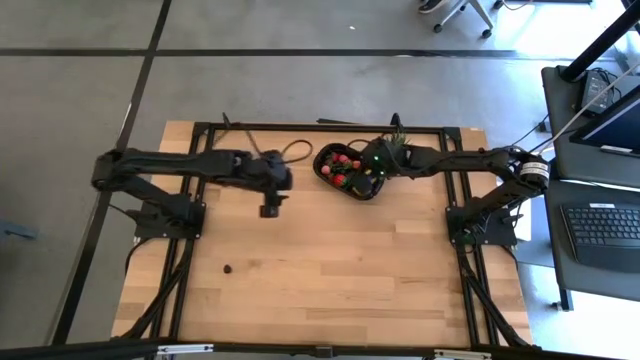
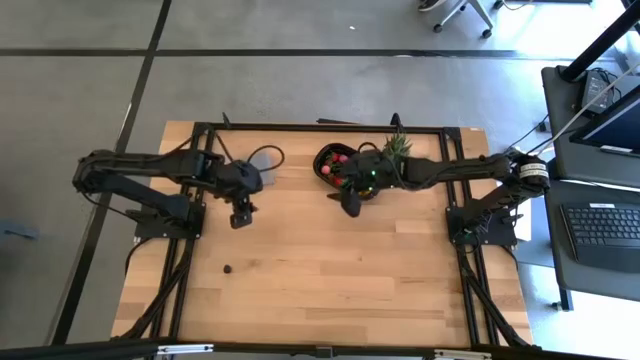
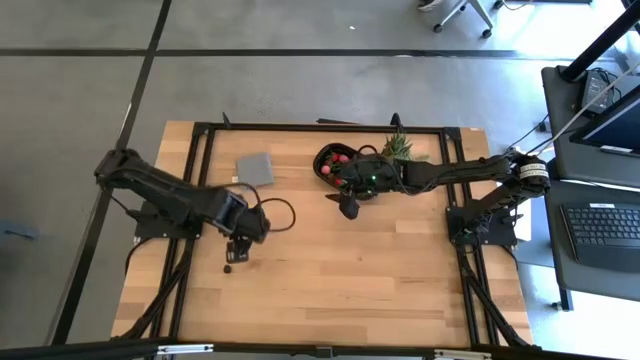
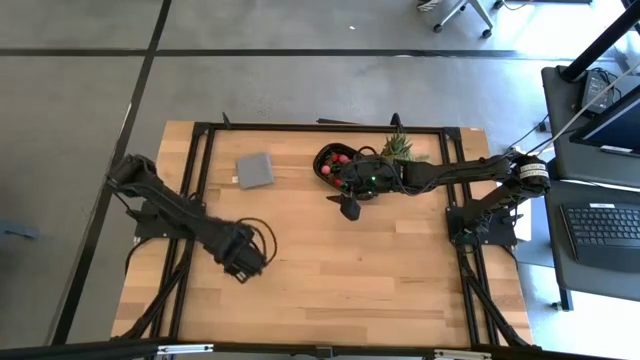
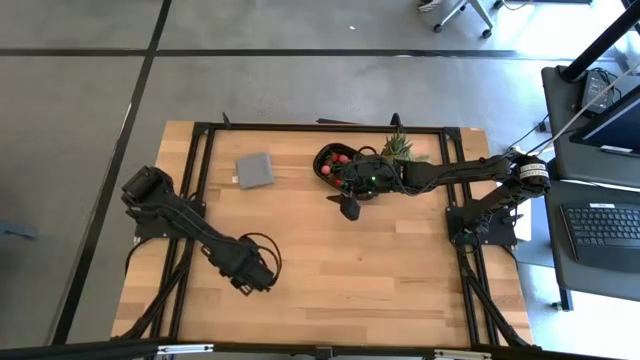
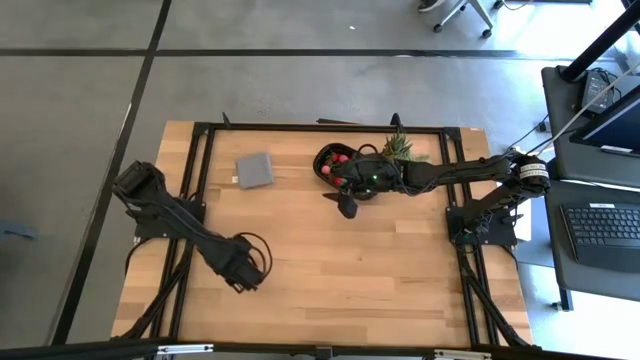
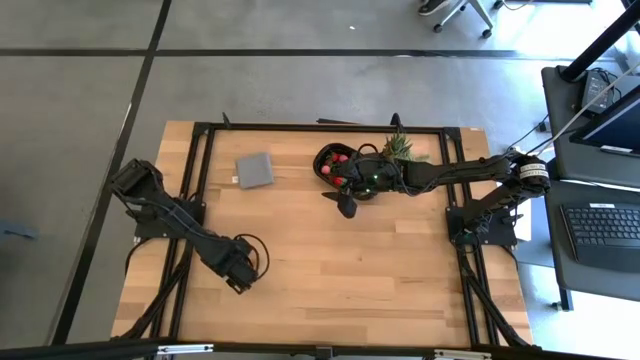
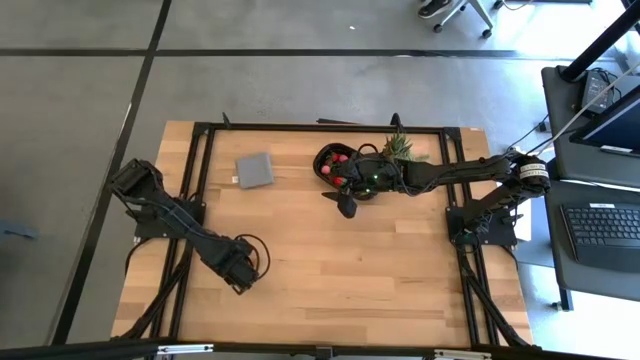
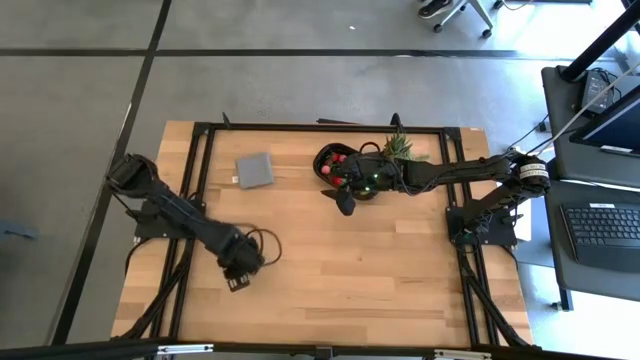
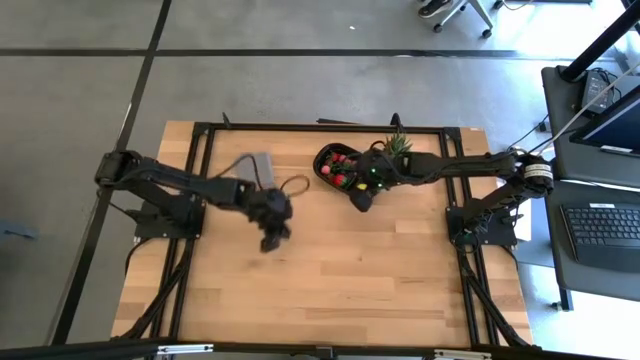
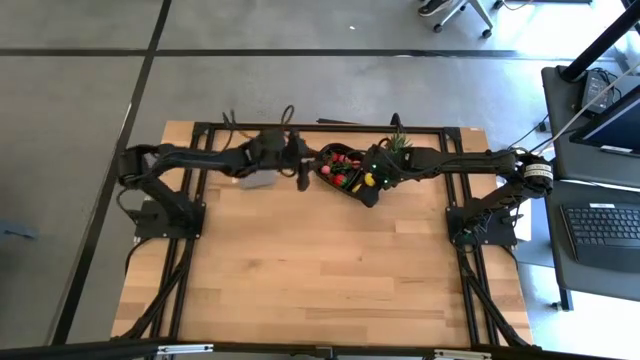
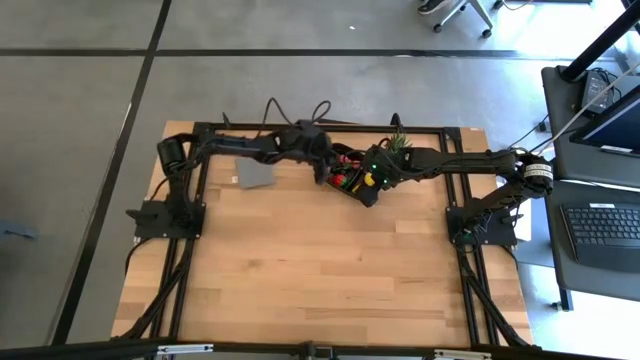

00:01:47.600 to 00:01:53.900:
Task: Pick and placing Produce into tupperware
Put the blackberry into the black bin

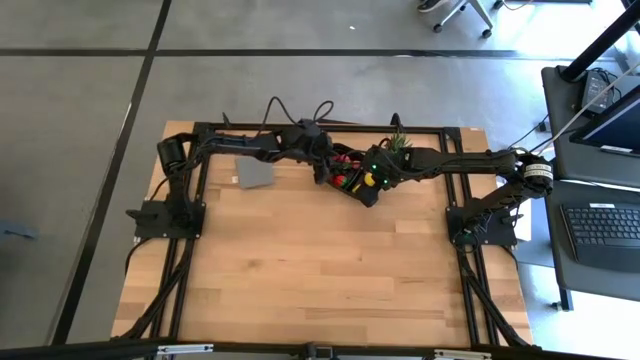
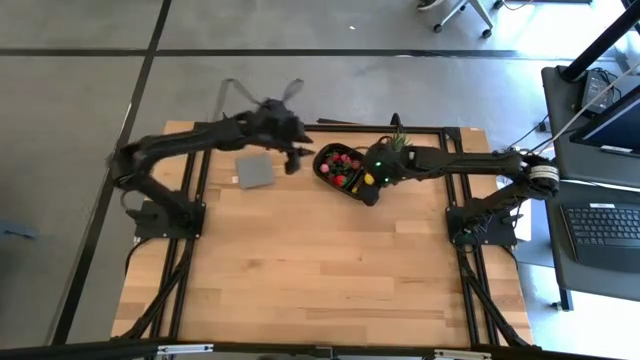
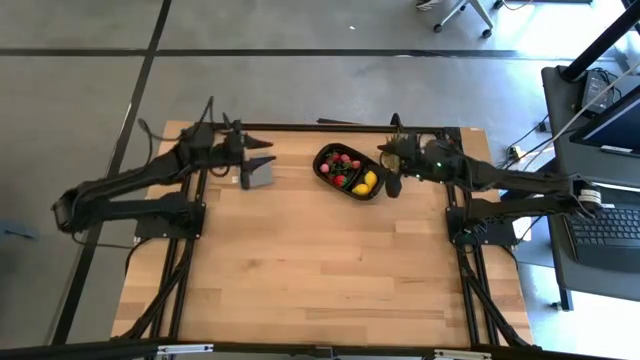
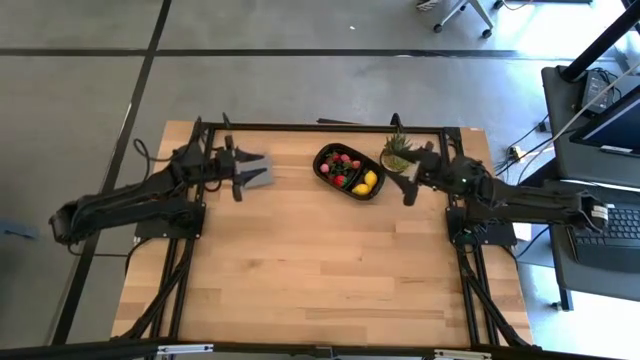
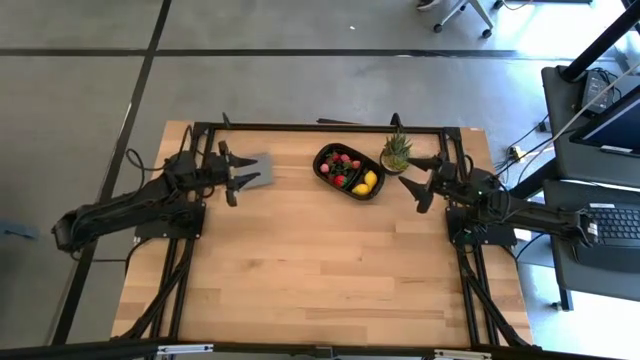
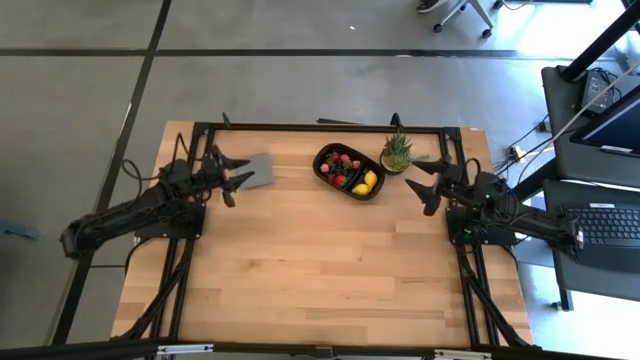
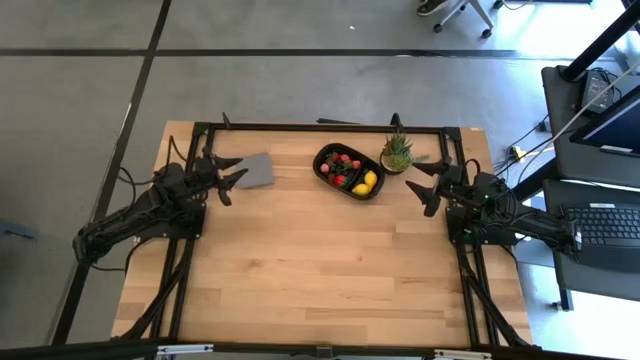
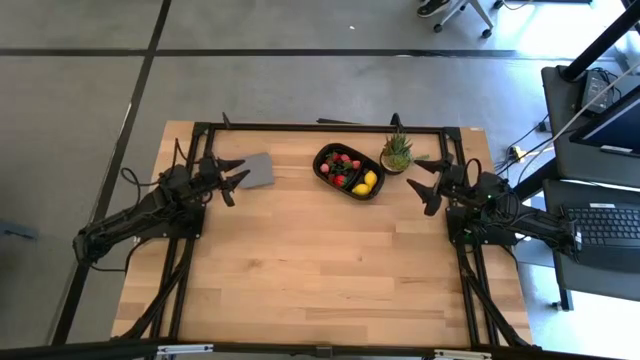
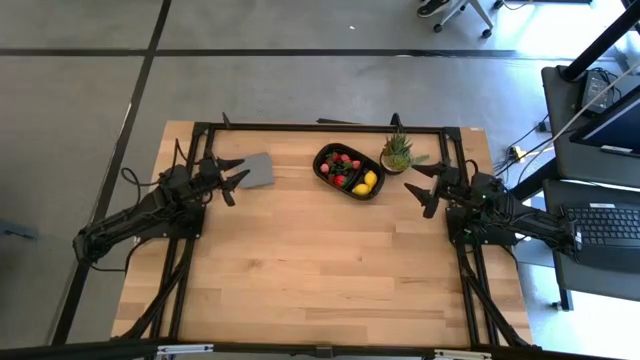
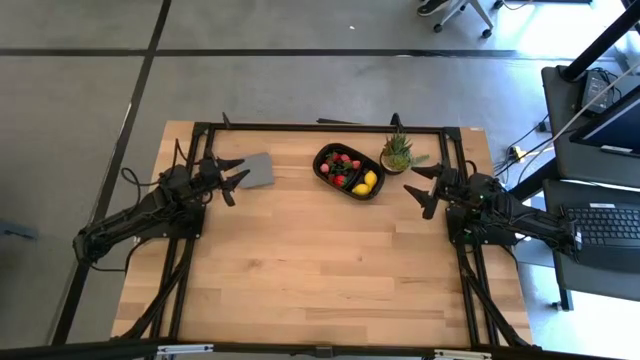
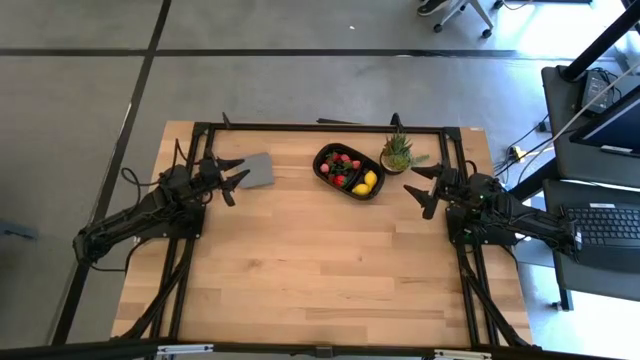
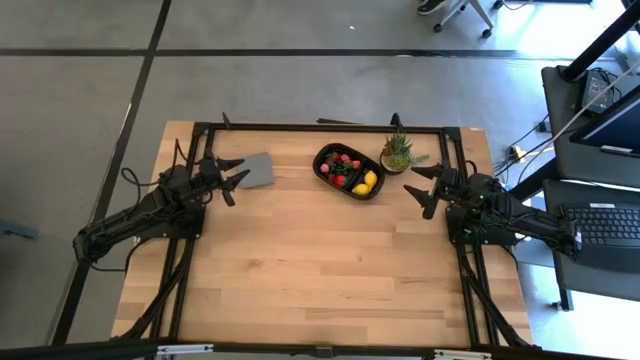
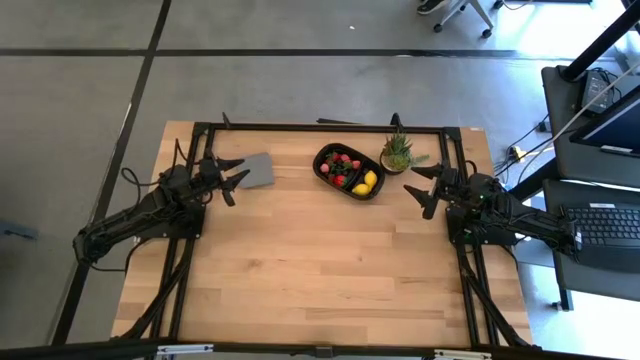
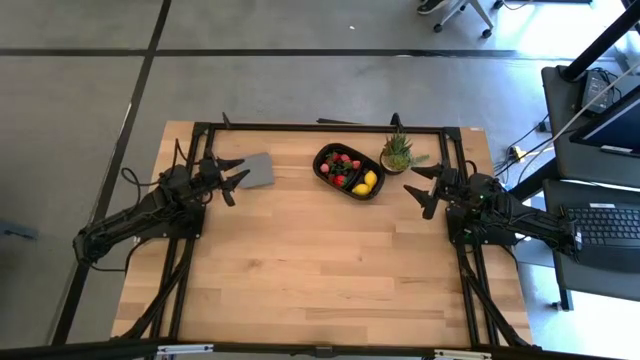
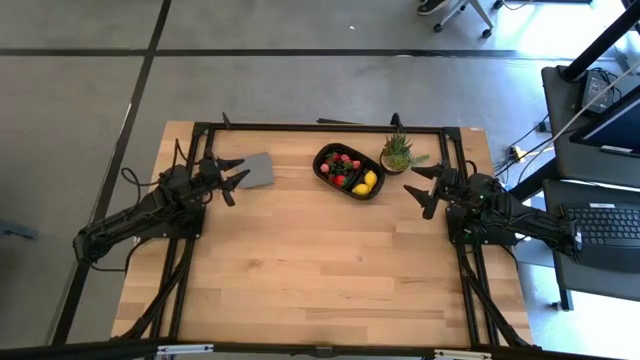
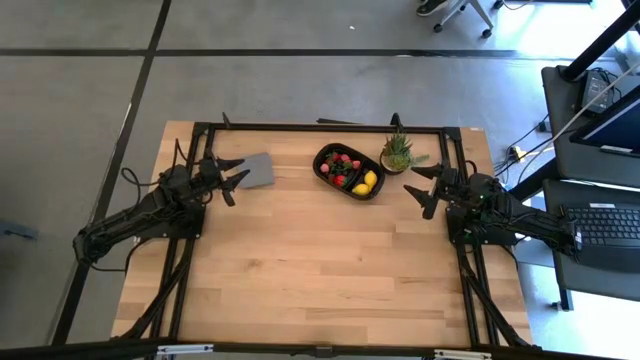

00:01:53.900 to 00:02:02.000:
Return to Home Position

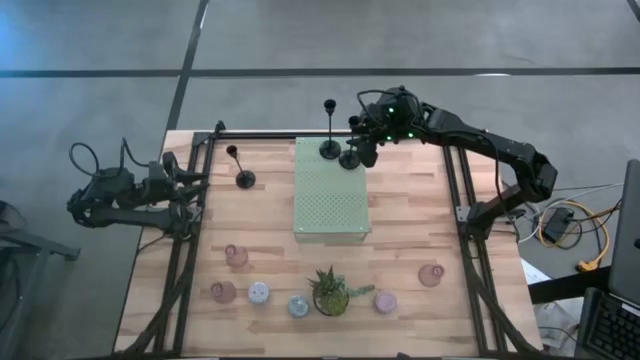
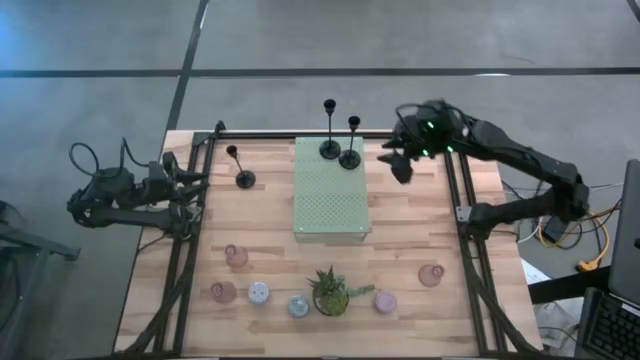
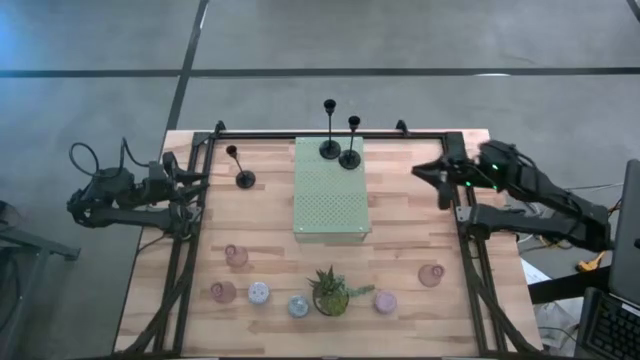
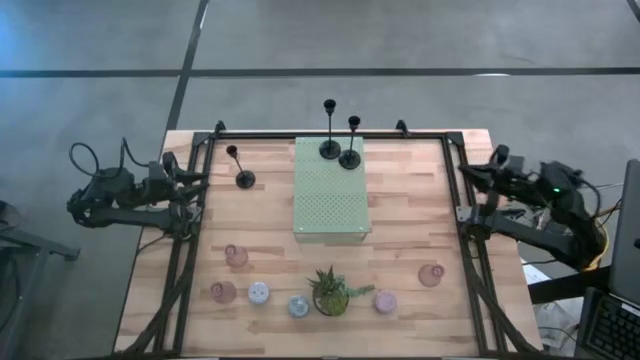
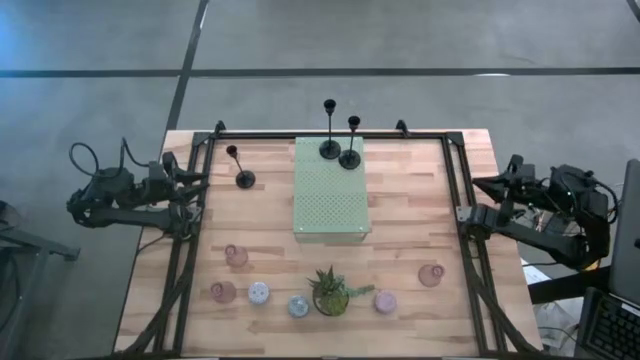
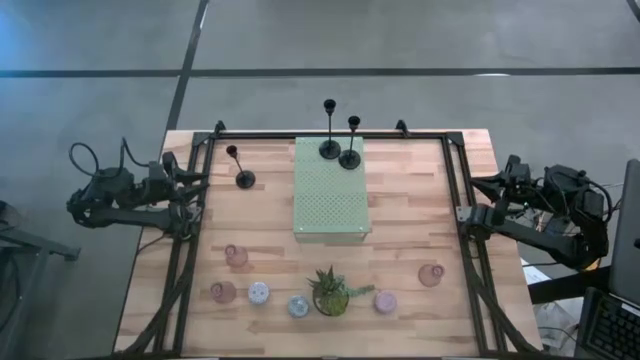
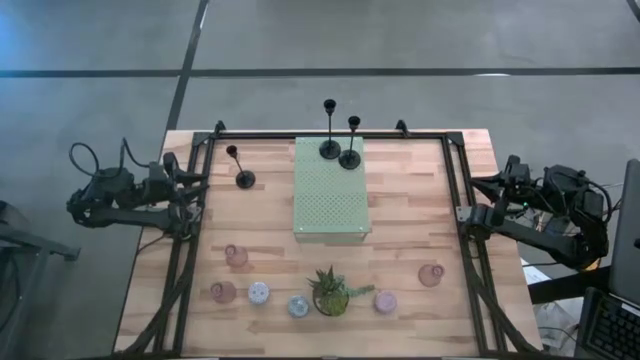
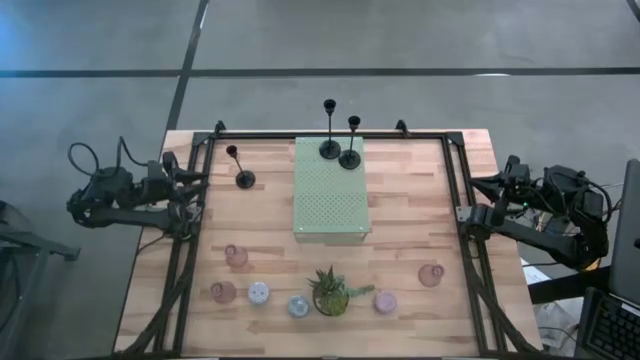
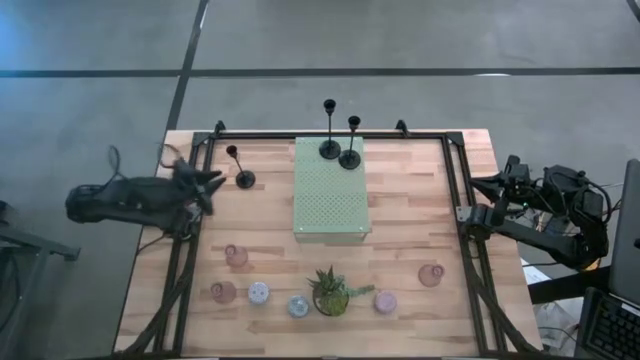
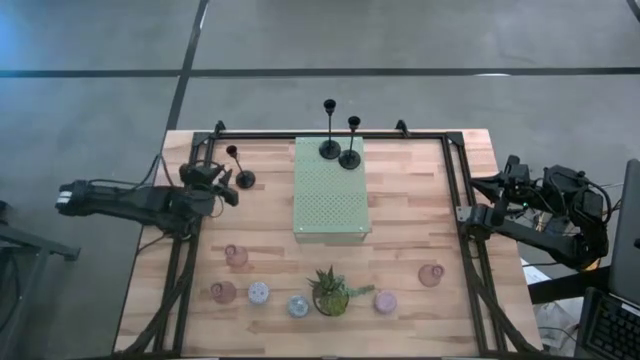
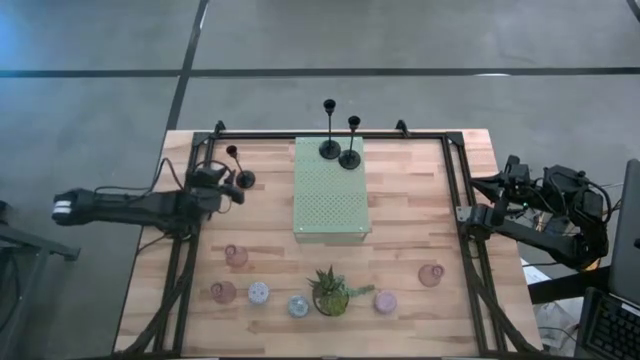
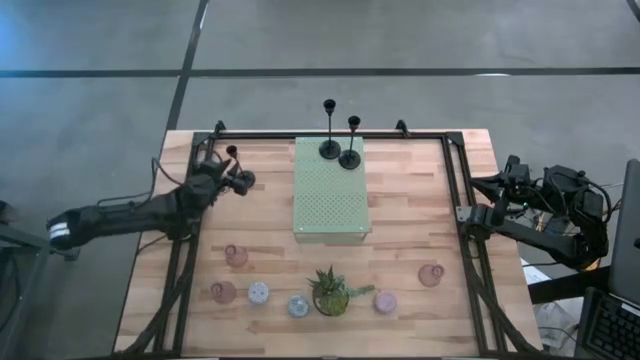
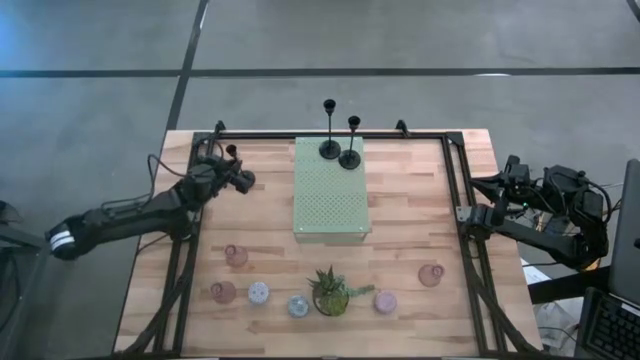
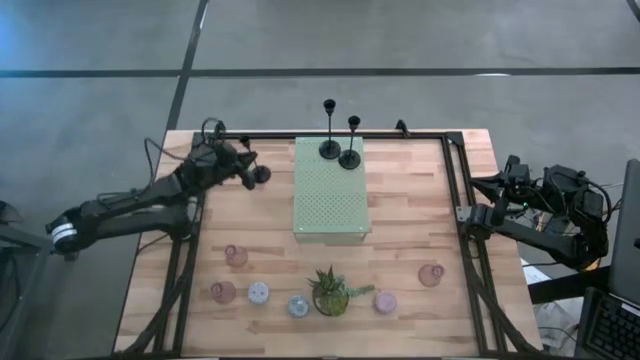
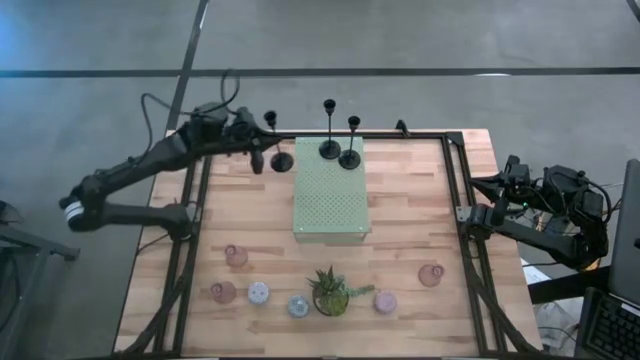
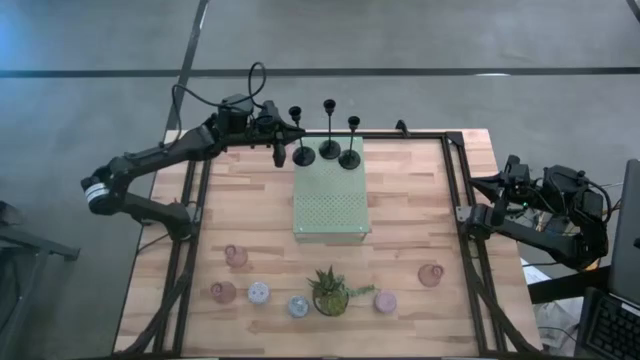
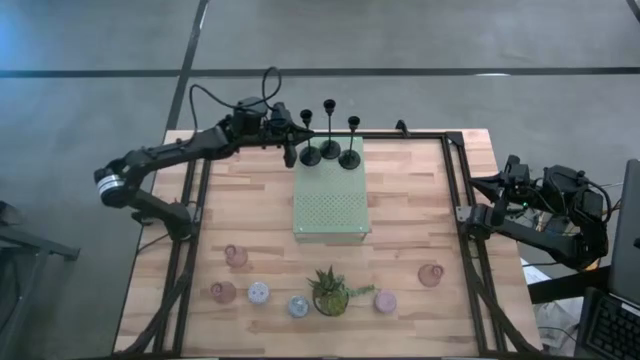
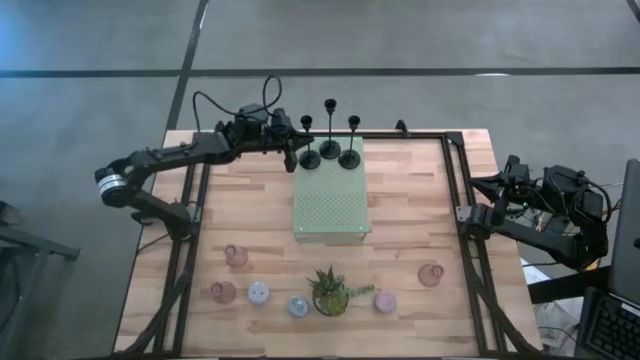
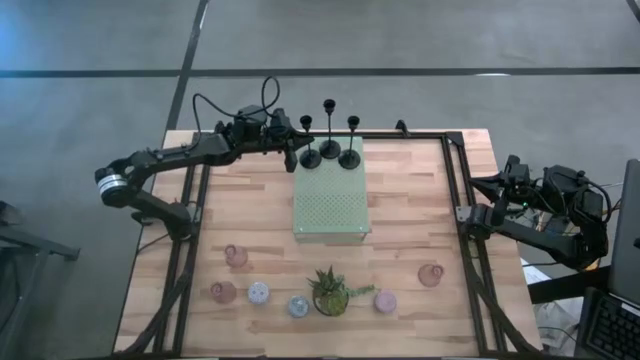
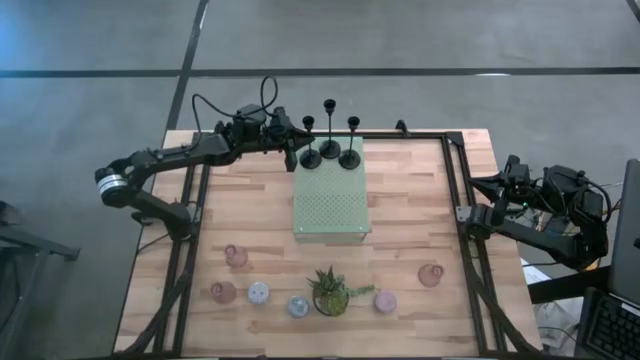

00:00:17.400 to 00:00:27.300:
Task: Pick & Place candle stick holders
Put the black candle holder on the shelf
